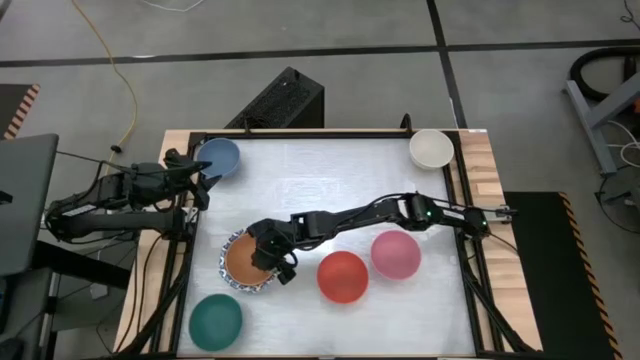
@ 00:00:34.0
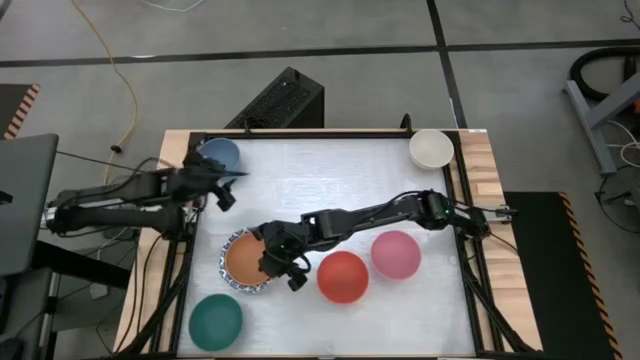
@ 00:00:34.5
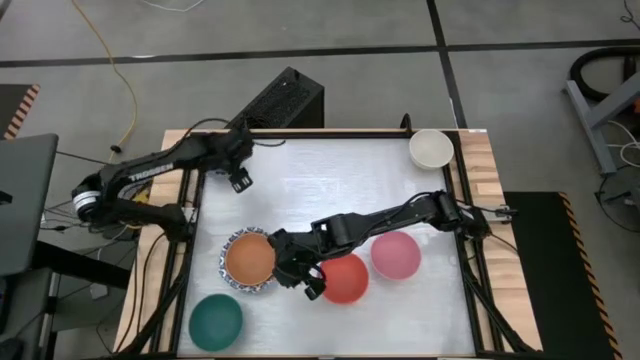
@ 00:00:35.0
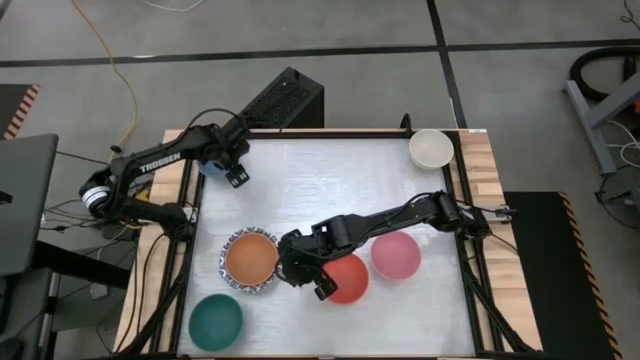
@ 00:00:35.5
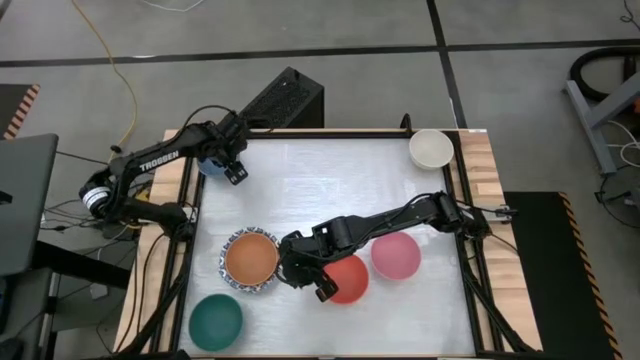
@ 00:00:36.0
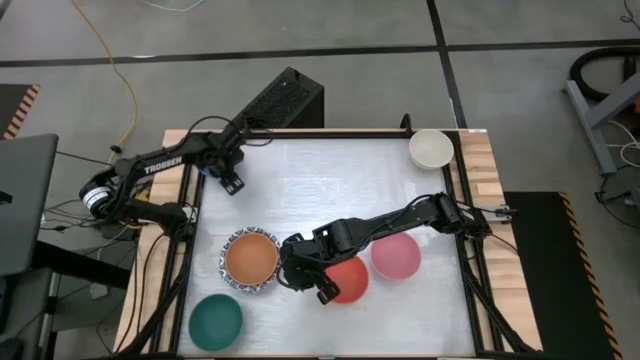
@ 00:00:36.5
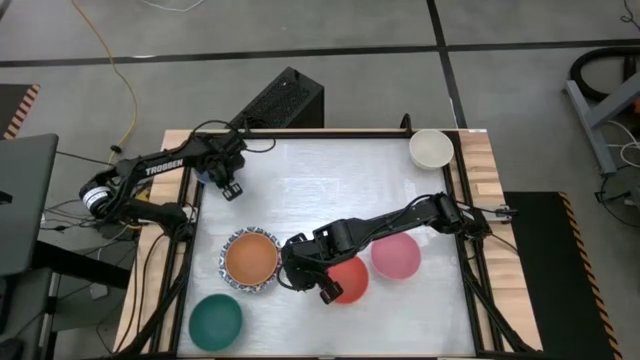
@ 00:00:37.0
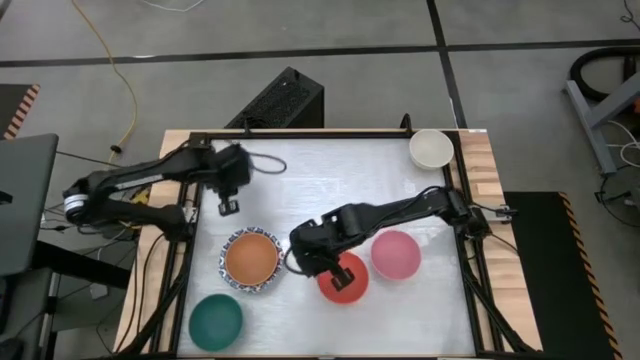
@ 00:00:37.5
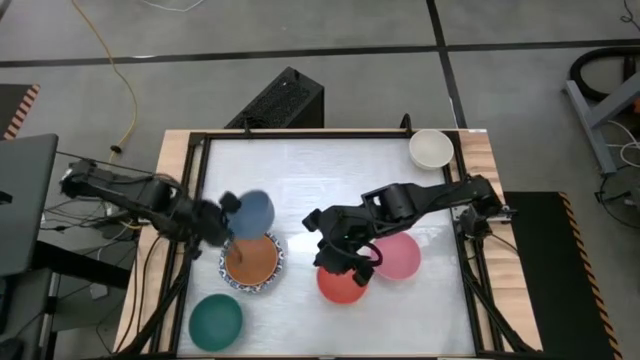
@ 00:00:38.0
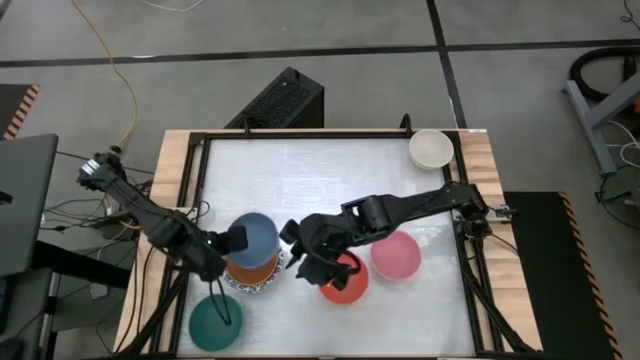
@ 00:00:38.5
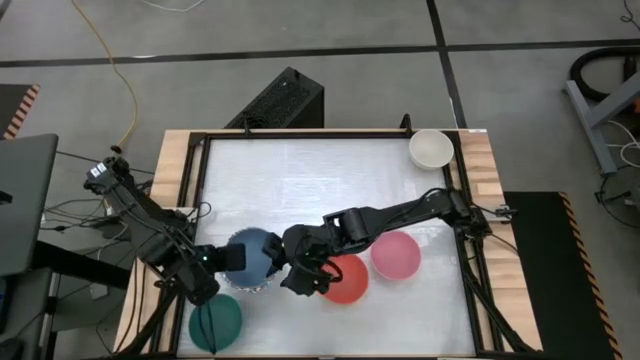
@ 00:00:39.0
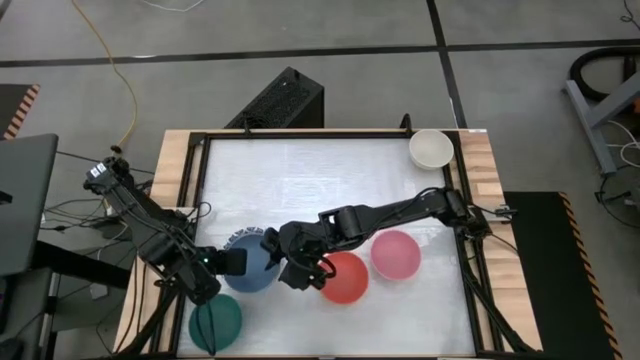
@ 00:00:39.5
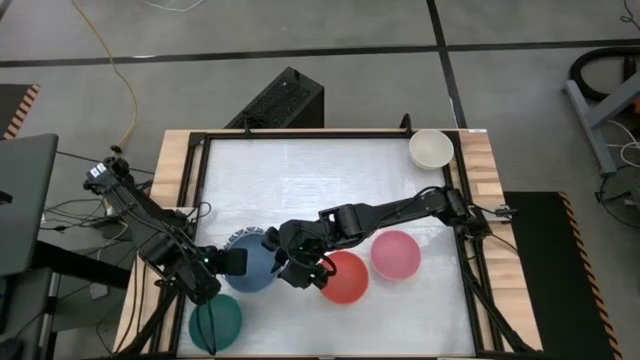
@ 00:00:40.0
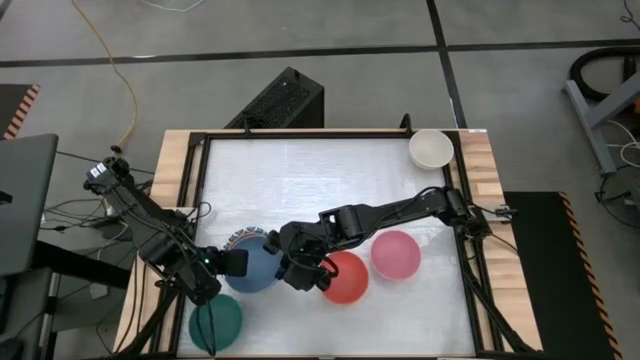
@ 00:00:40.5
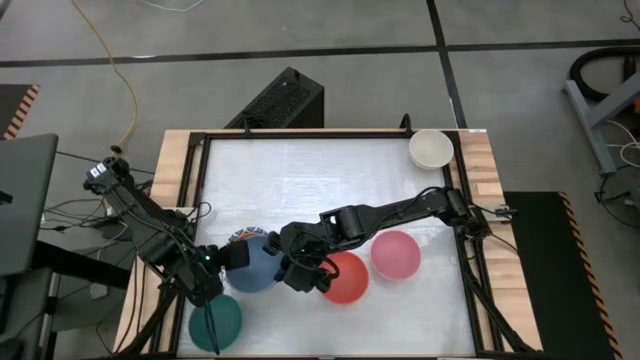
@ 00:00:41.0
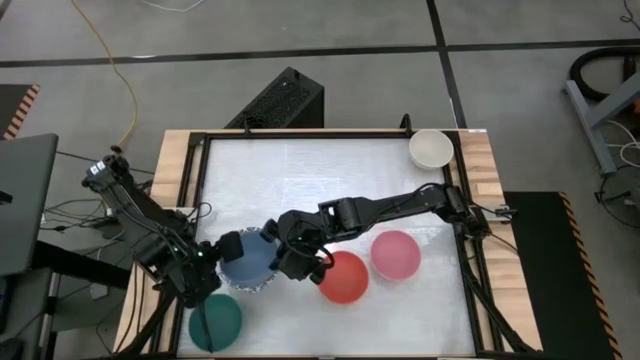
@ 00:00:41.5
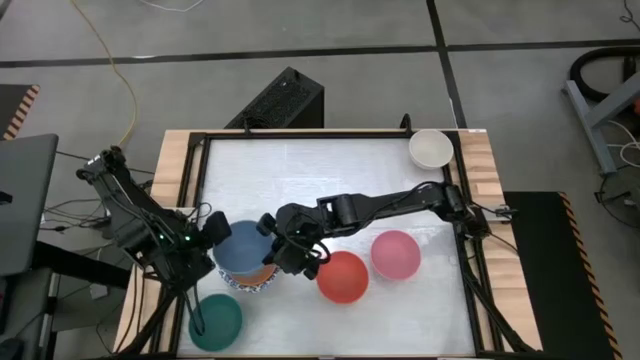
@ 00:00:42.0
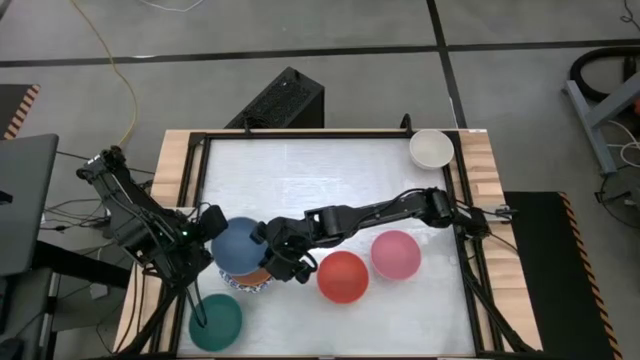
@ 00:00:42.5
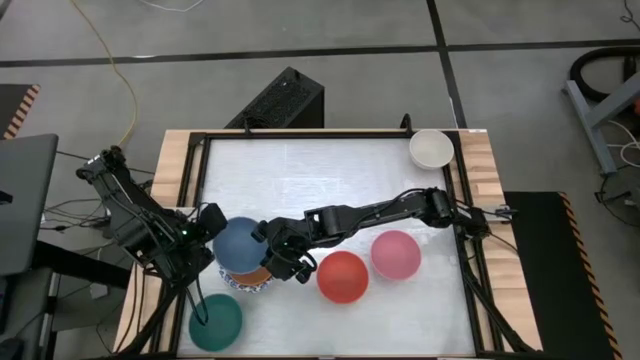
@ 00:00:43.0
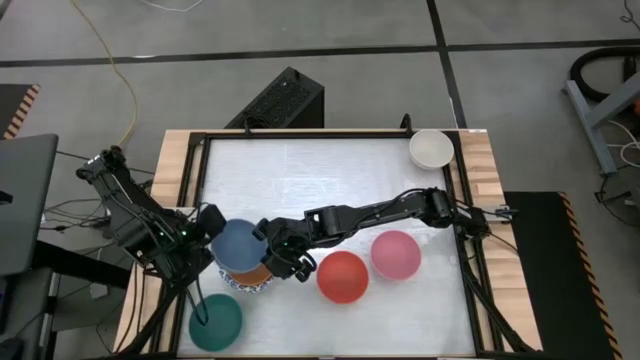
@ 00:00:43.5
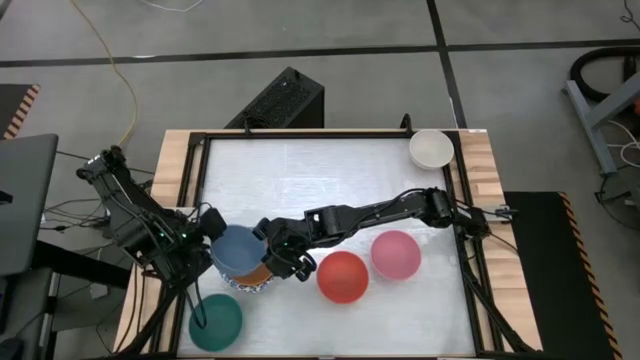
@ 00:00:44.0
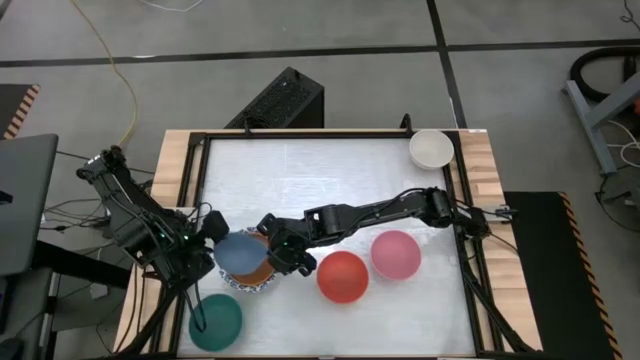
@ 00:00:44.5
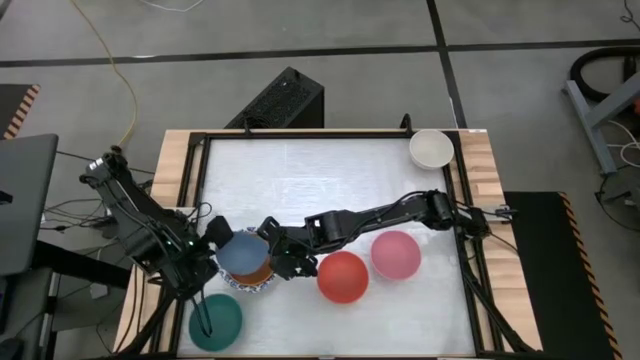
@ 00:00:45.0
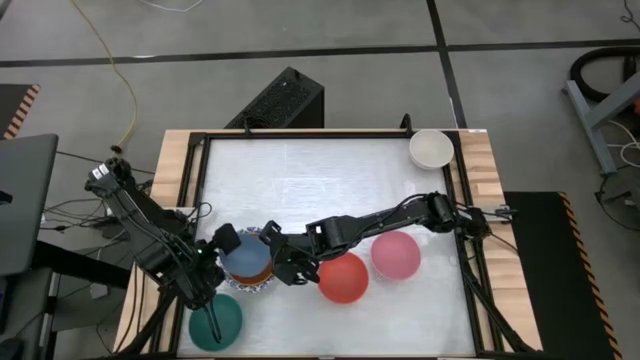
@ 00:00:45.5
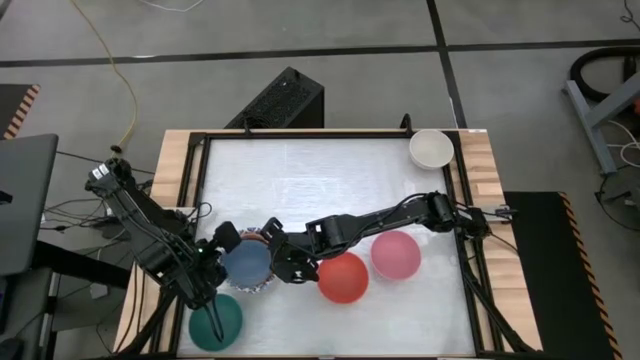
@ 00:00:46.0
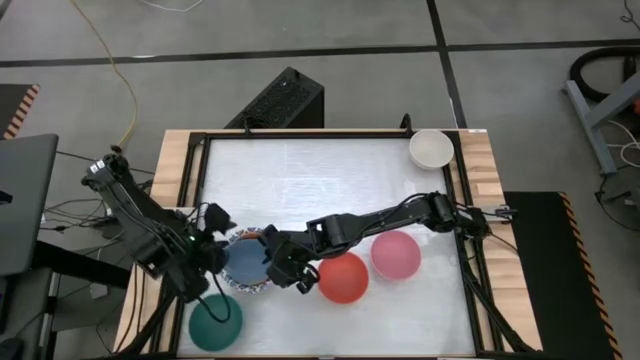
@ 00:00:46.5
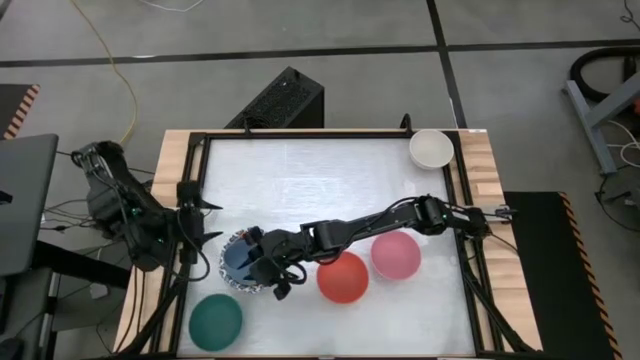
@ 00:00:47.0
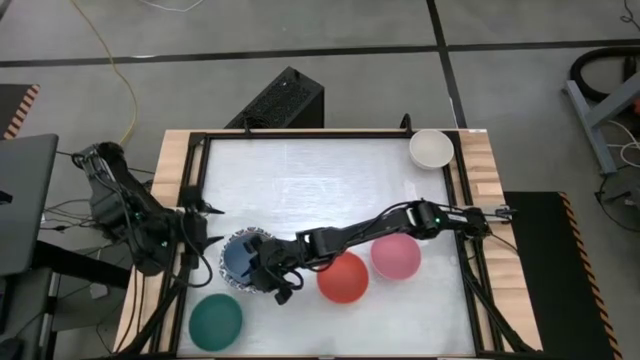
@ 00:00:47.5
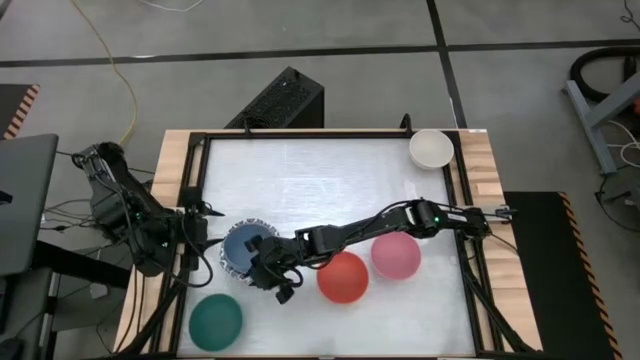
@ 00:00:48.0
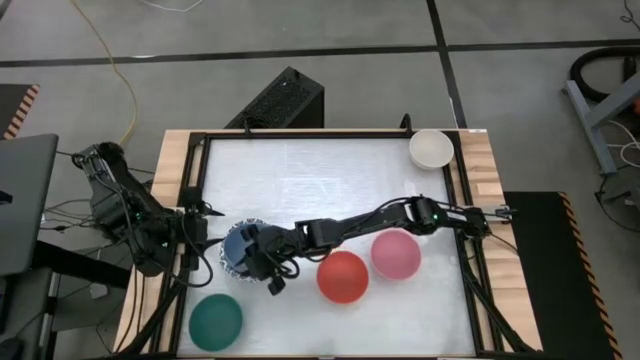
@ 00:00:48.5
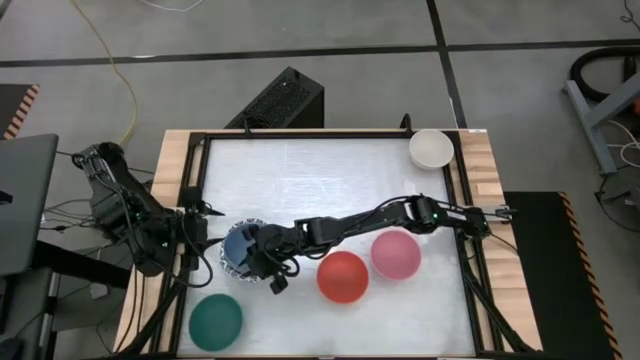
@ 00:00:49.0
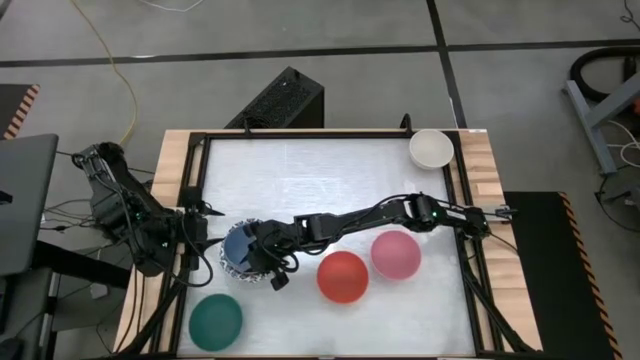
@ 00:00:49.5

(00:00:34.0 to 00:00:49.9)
Stack the blue bowl on top of the light orange bowl
